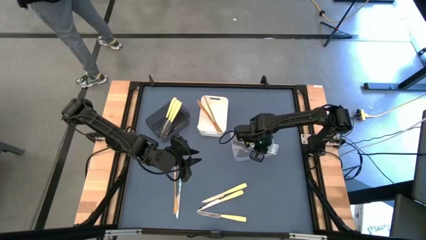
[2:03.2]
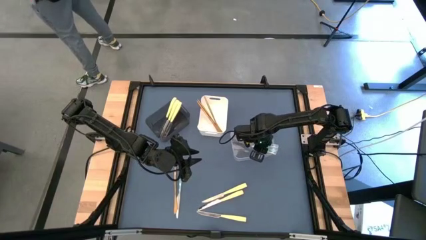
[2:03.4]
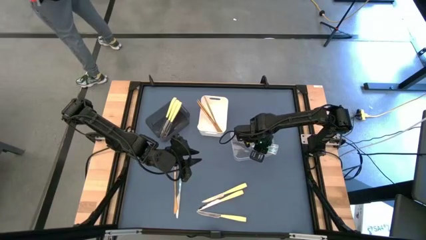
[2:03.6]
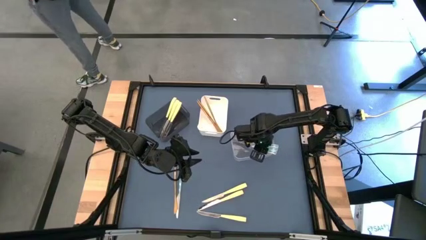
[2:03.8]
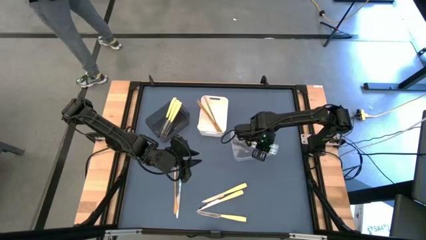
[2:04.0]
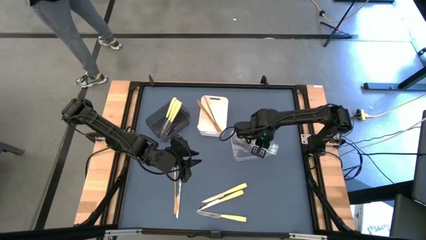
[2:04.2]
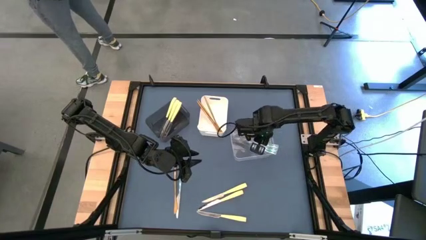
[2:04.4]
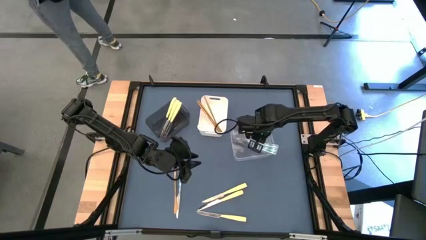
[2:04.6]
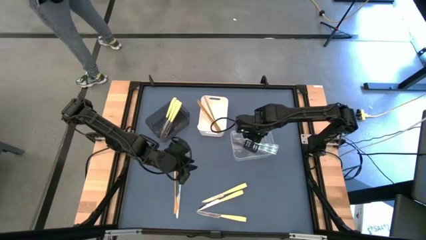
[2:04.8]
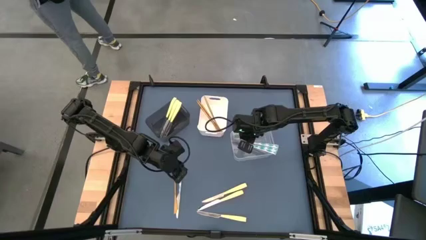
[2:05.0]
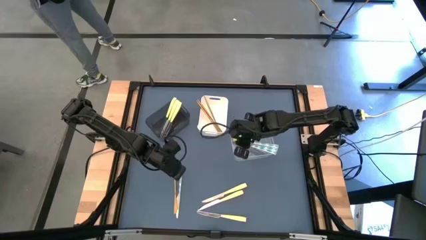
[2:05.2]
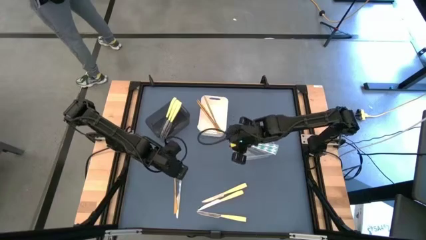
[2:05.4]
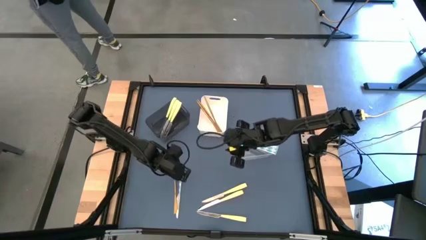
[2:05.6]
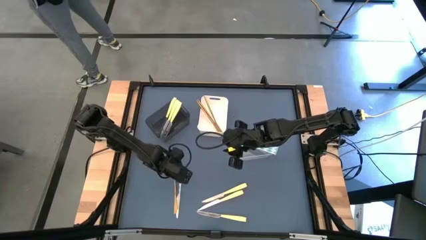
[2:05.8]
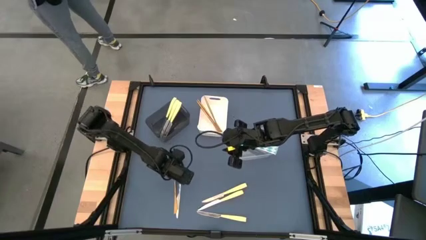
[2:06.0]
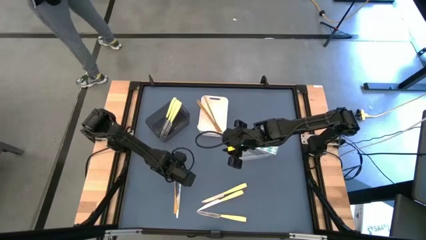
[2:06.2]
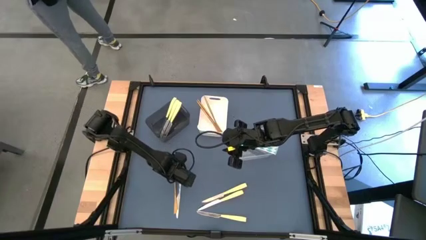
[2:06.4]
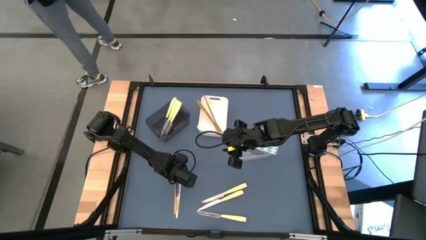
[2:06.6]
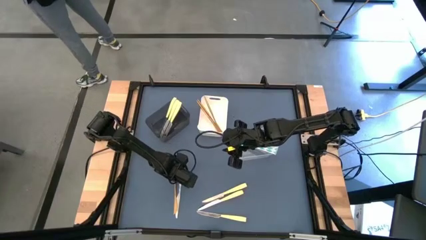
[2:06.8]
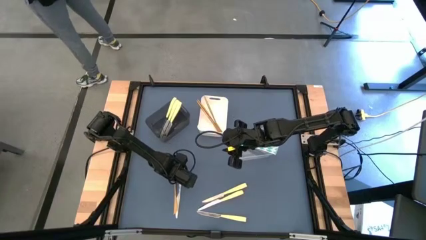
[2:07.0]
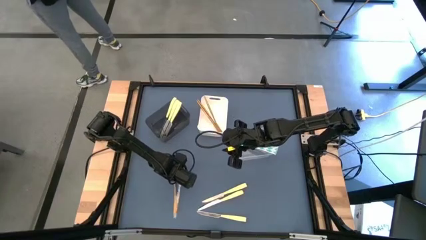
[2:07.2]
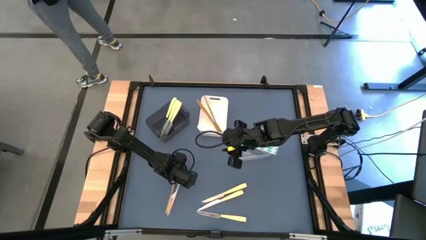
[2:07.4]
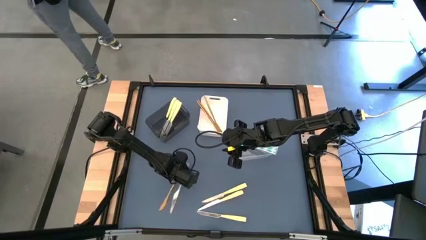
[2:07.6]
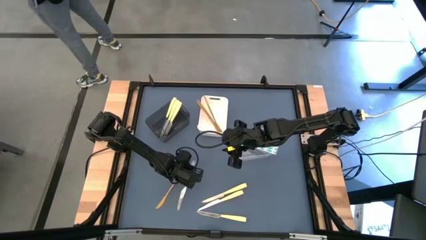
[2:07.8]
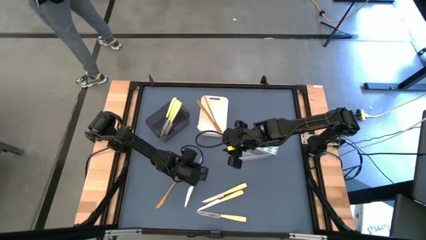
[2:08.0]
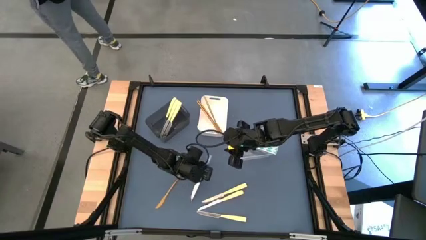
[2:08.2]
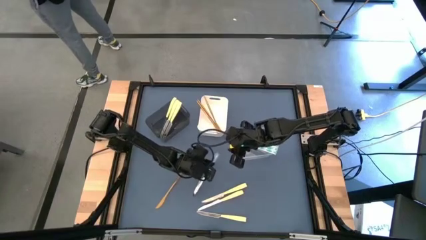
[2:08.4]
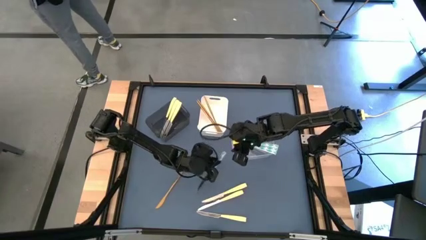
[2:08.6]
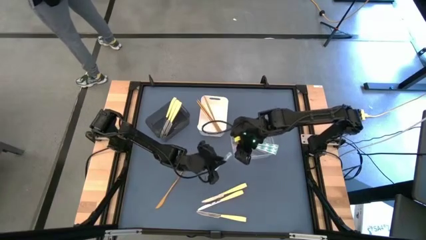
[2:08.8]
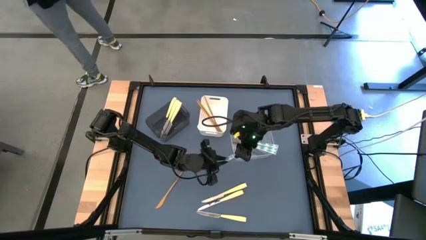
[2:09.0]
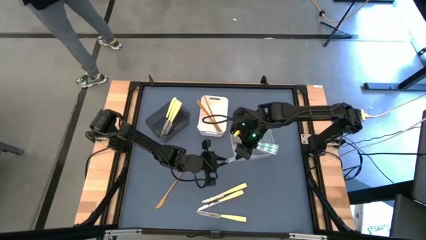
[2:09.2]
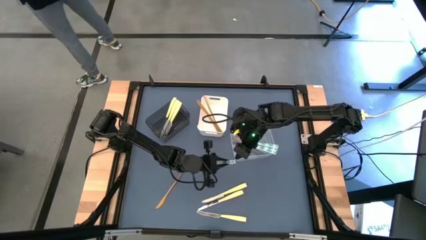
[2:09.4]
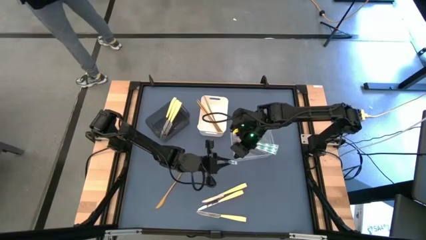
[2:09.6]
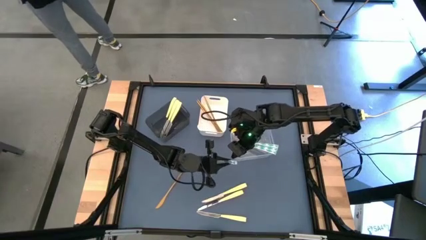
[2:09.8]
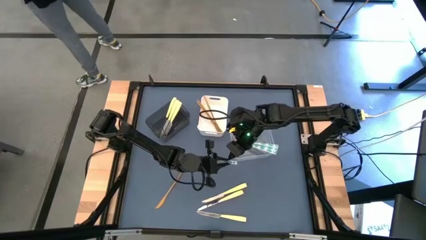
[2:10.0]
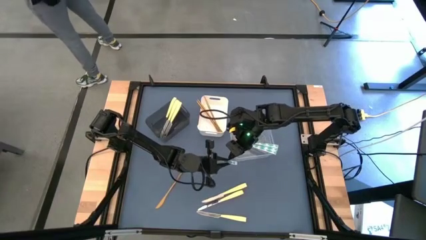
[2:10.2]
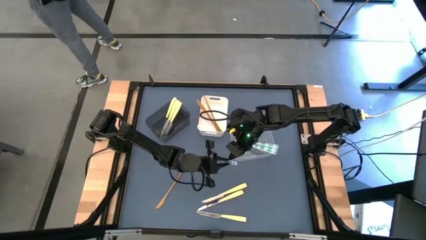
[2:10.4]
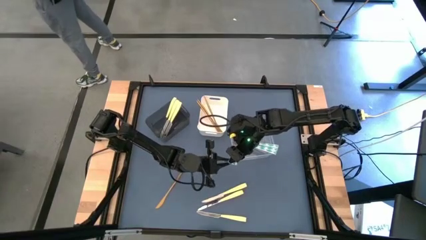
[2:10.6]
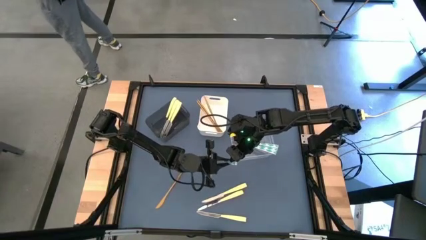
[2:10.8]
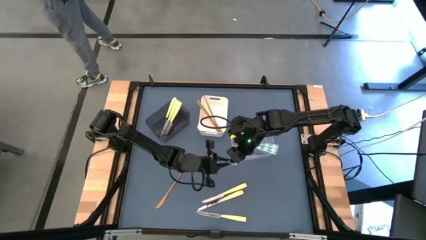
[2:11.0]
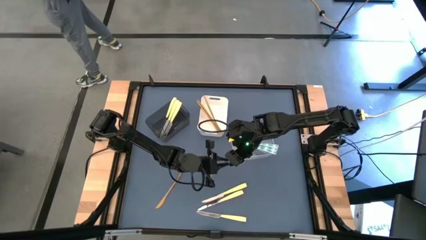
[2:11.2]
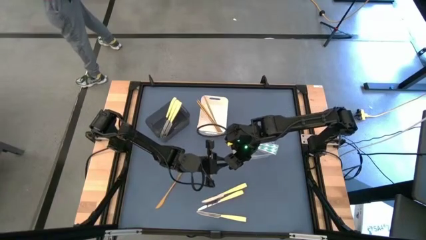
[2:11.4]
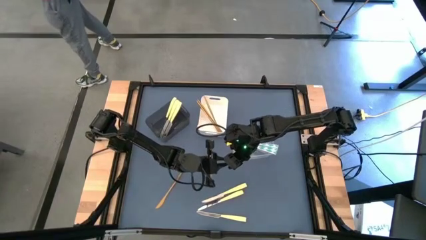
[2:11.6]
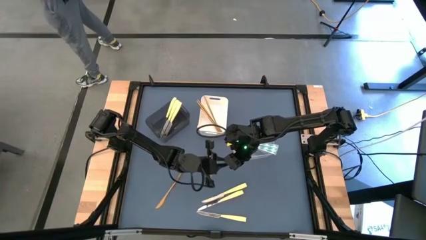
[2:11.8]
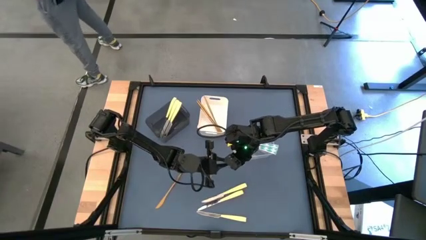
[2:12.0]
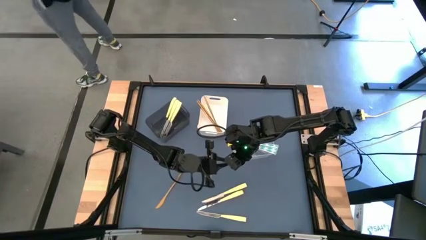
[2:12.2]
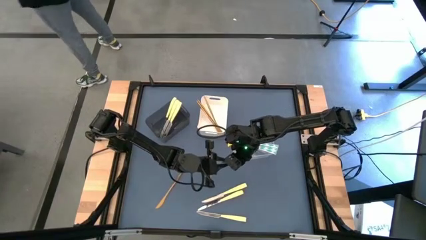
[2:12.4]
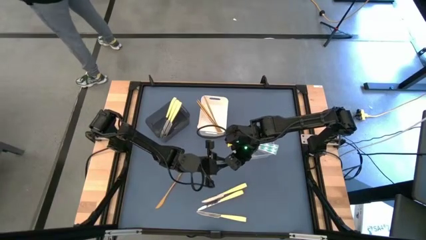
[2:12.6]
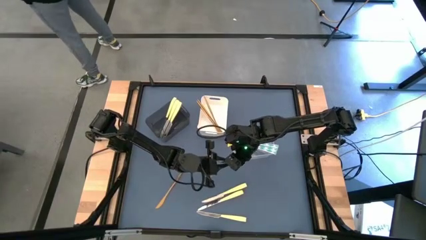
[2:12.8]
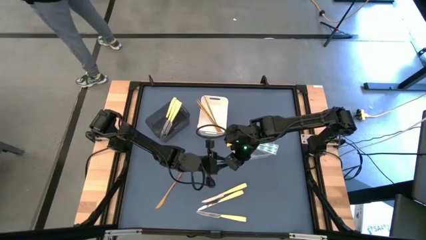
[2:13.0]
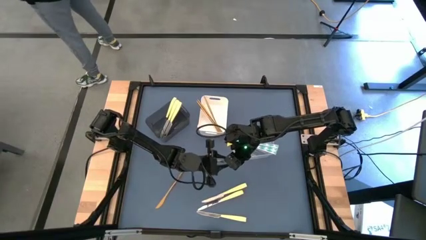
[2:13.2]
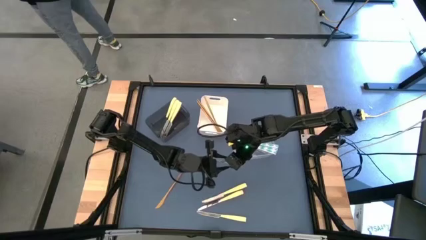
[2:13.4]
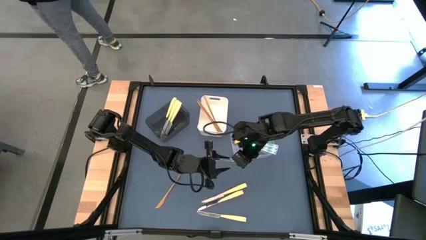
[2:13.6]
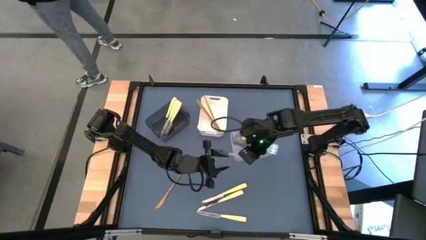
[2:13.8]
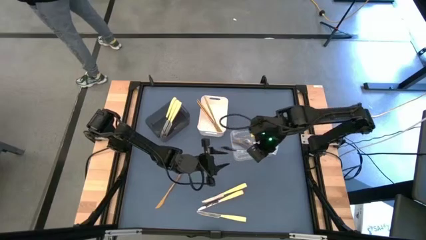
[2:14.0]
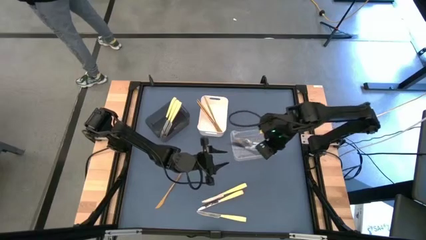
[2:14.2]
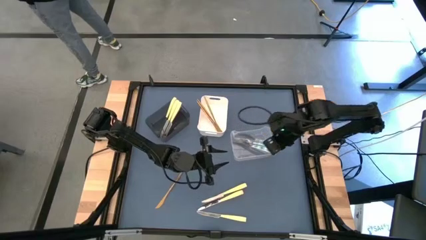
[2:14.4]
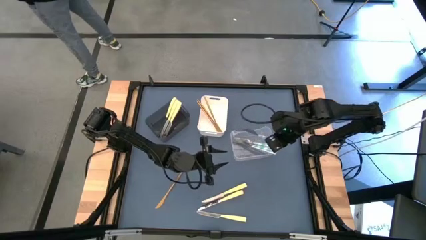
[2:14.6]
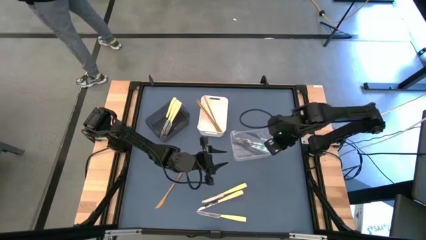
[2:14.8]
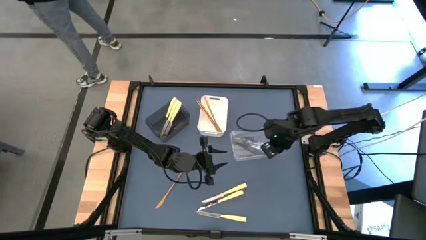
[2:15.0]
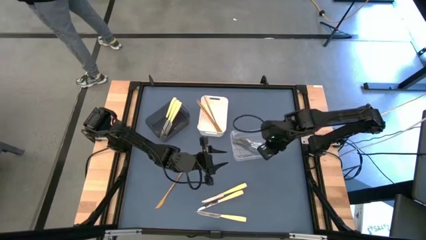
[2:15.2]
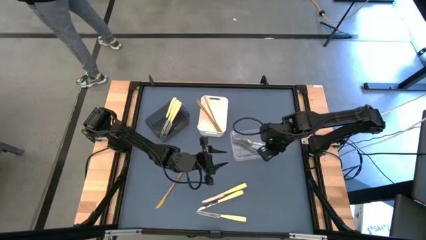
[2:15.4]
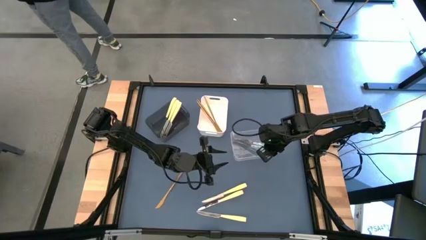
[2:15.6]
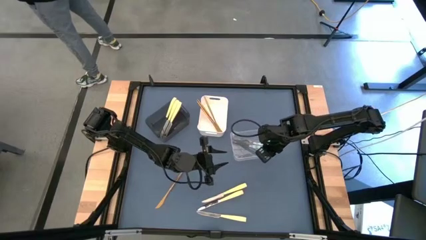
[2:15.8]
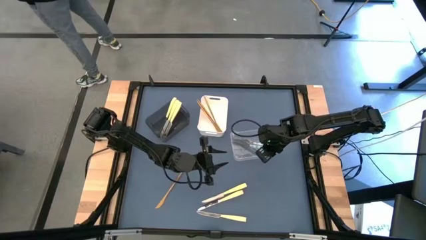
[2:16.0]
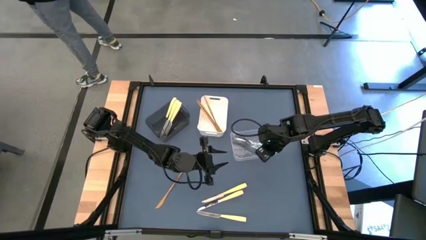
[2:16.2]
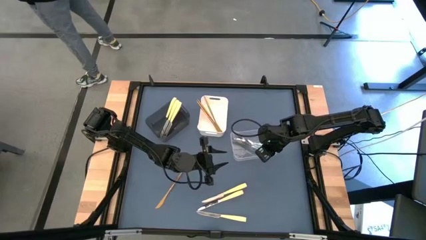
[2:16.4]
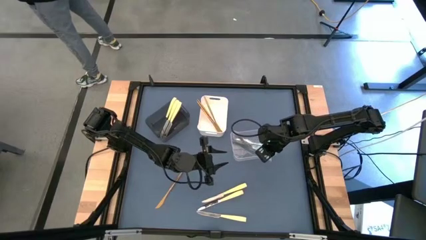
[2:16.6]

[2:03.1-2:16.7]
Task: Sort silverware by color (type)
Put the green knife into the transparent bin

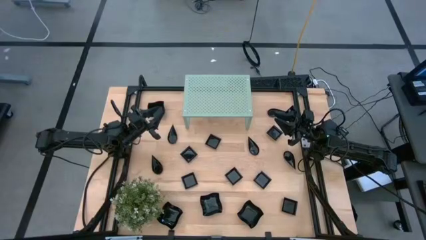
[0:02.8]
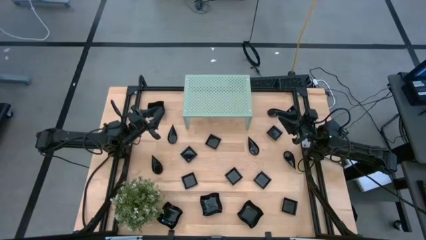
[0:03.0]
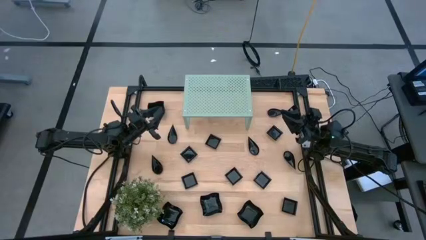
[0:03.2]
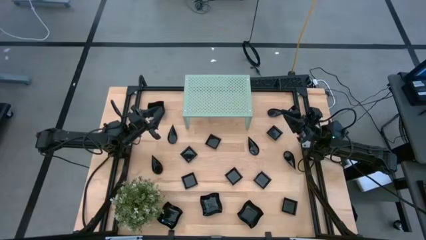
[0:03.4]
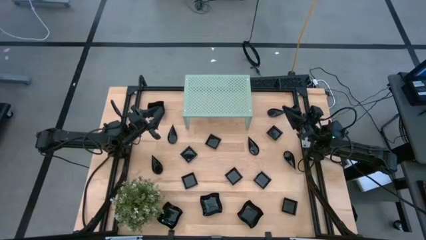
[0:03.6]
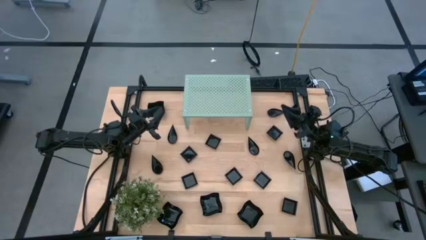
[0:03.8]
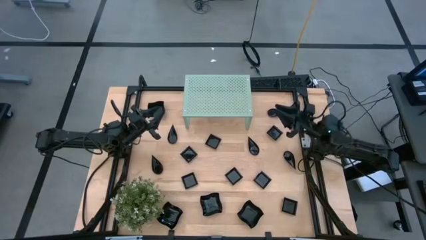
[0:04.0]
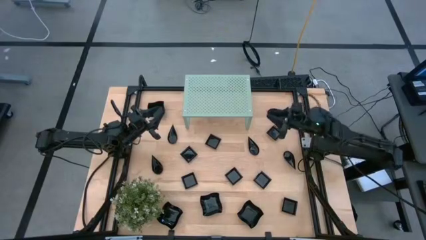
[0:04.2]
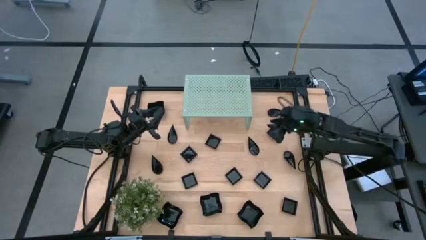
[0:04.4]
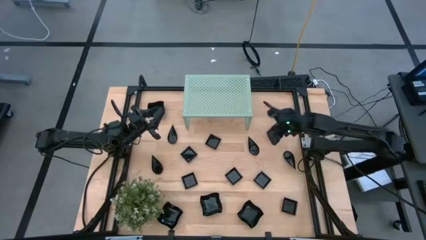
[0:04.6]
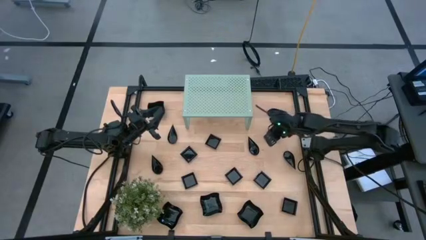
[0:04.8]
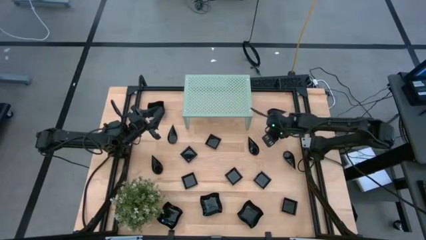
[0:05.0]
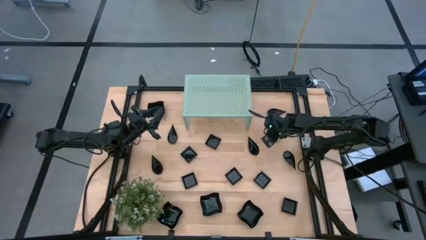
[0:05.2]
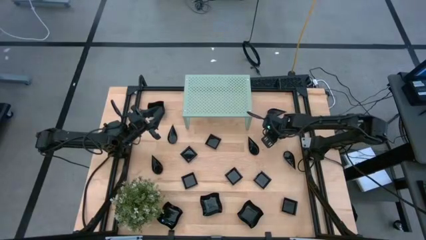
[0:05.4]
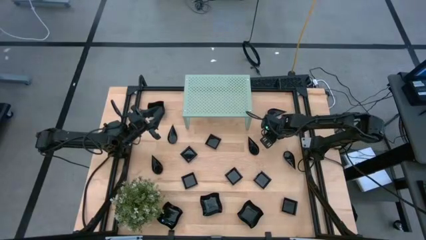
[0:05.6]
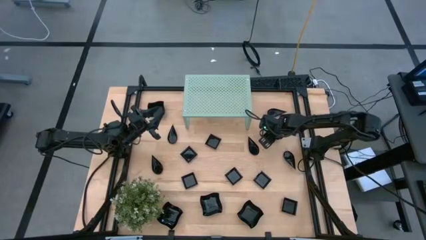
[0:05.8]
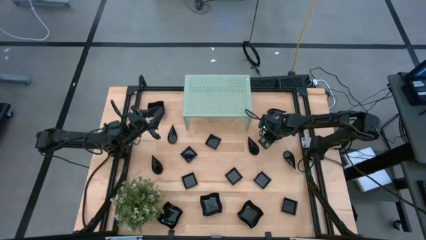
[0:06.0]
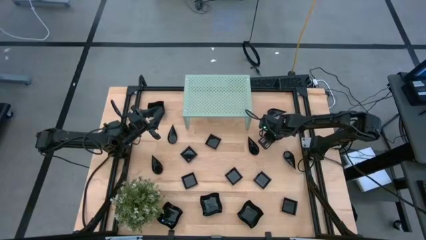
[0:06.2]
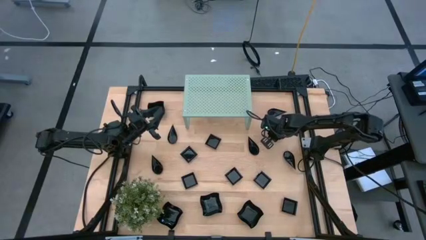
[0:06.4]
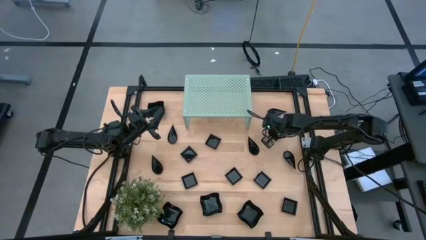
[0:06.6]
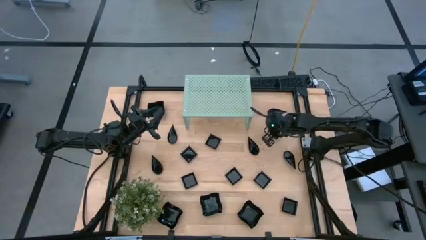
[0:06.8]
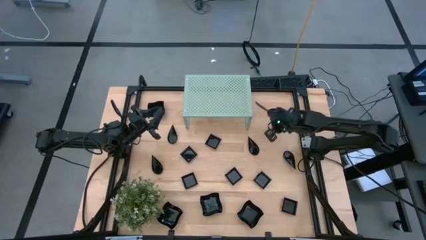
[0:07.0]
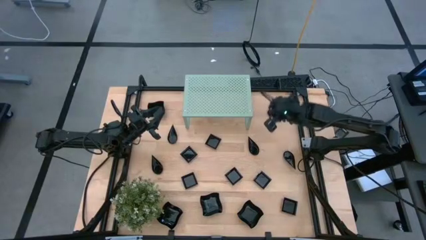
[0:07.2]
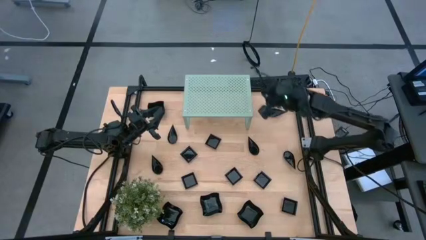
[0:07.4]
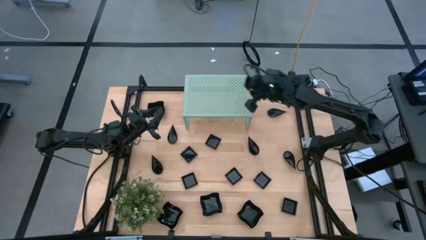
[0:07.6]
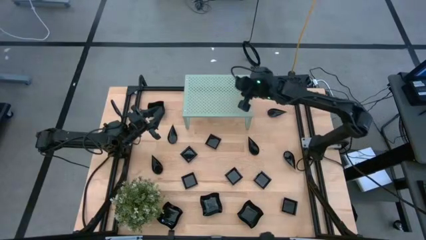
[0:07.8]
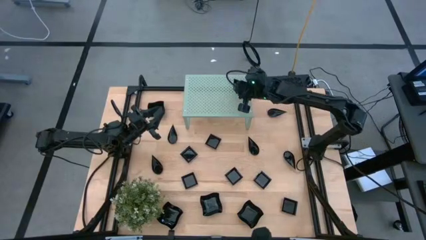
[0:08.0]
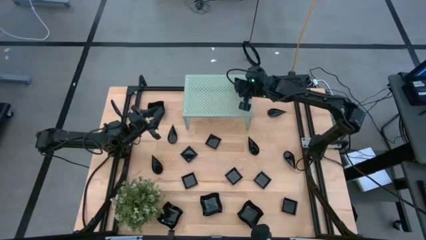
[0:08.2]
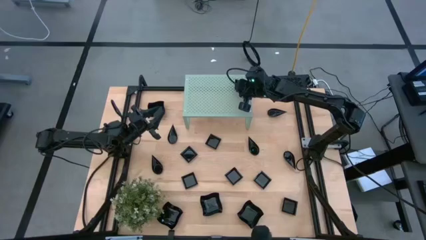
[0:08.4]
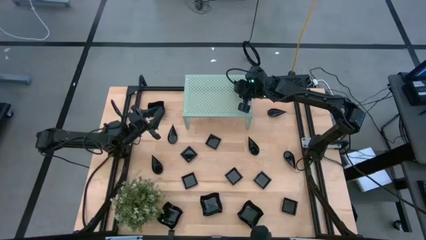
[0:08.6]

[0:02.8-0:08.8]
Task: Pick & Place Mini shaped plates
Put the black square plate on the shelf
